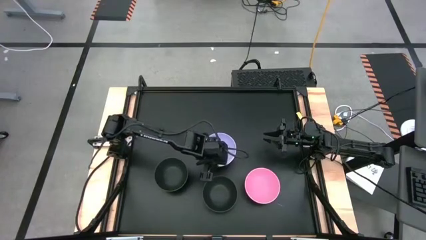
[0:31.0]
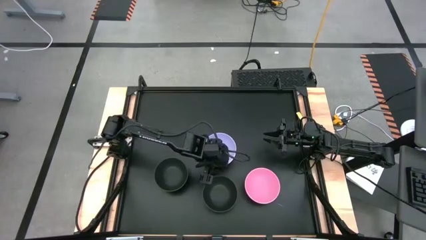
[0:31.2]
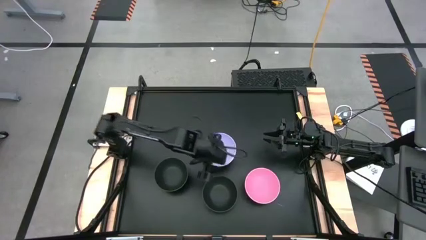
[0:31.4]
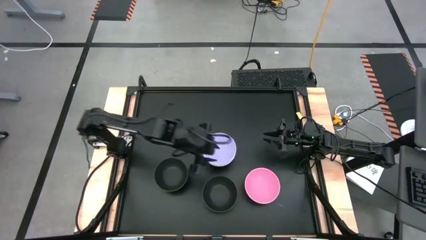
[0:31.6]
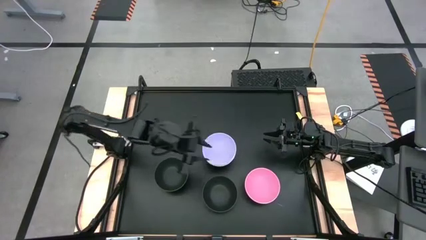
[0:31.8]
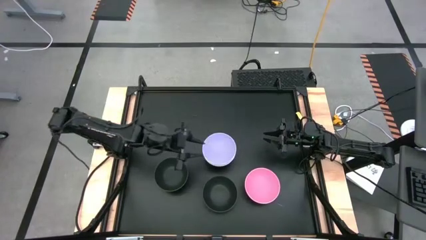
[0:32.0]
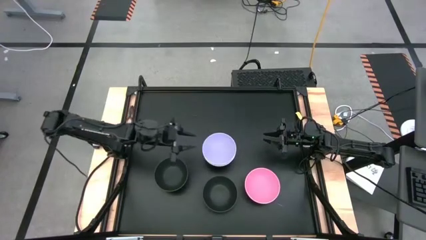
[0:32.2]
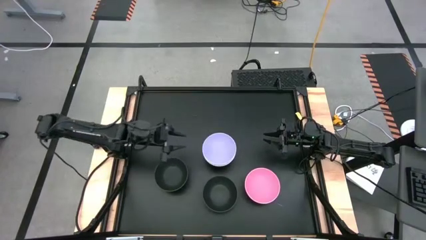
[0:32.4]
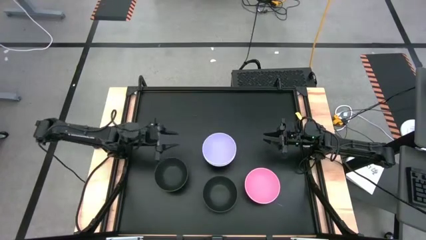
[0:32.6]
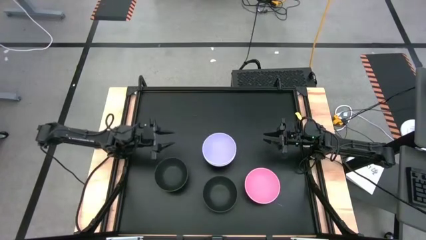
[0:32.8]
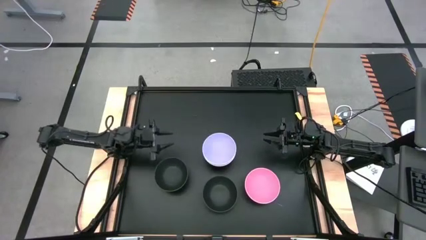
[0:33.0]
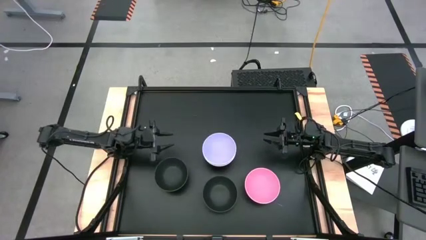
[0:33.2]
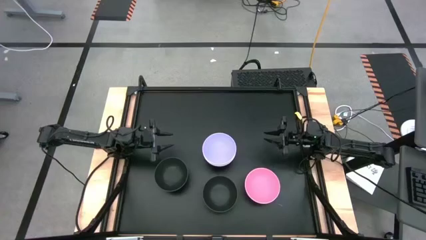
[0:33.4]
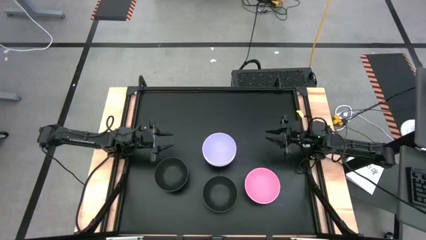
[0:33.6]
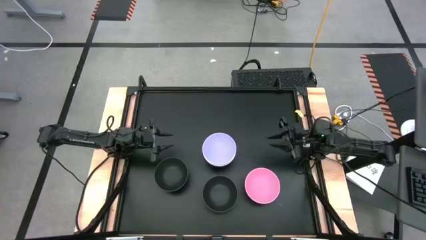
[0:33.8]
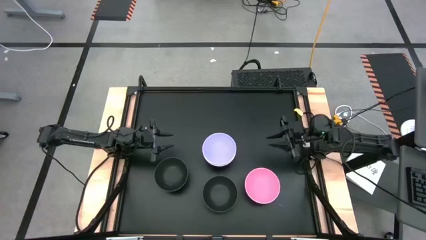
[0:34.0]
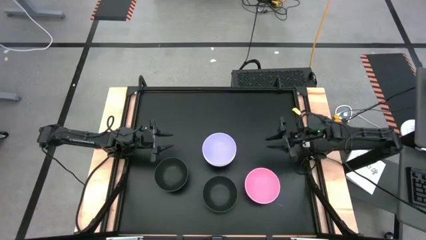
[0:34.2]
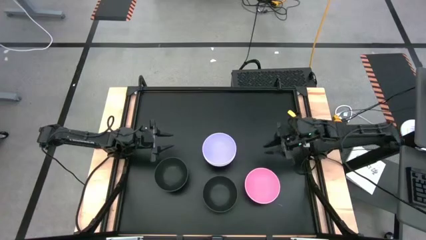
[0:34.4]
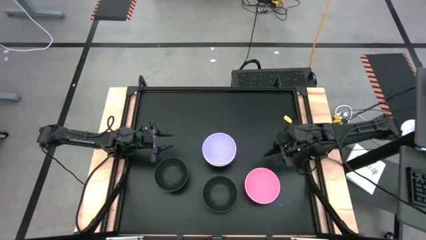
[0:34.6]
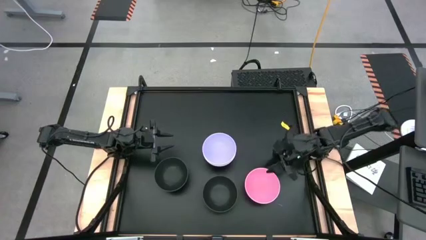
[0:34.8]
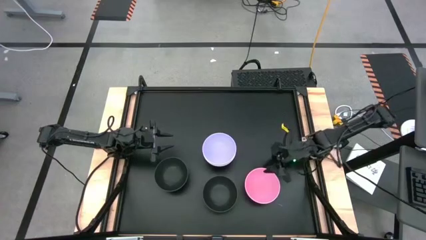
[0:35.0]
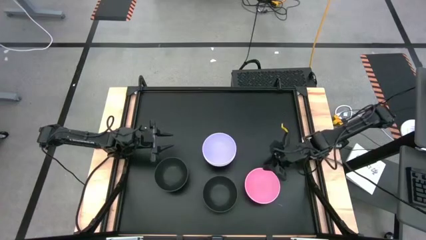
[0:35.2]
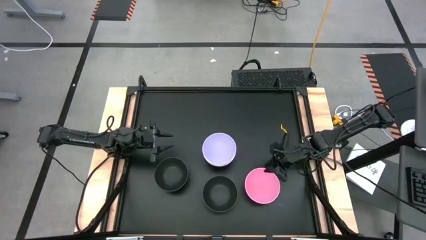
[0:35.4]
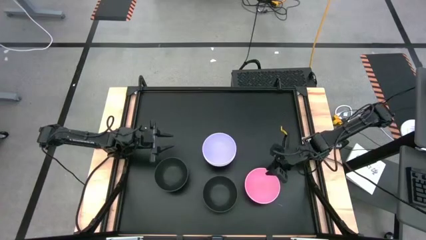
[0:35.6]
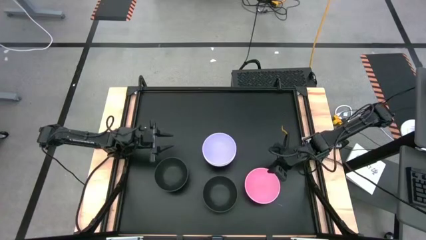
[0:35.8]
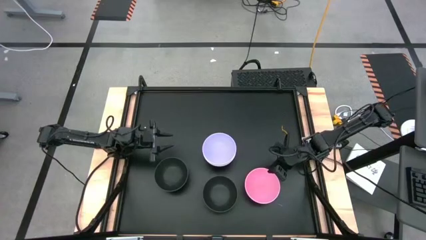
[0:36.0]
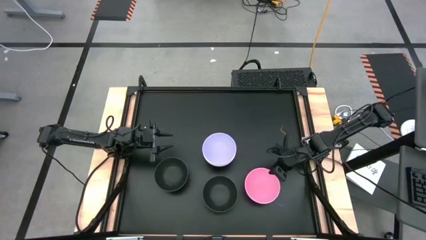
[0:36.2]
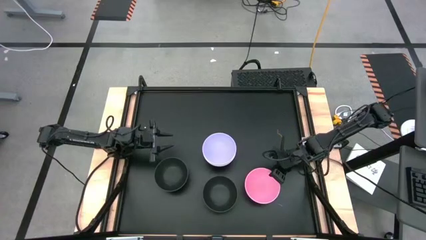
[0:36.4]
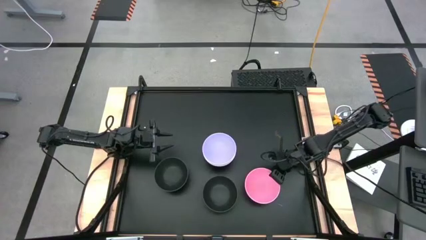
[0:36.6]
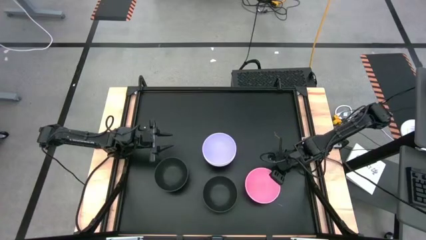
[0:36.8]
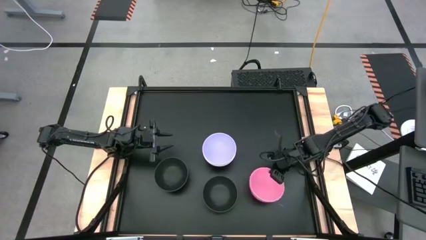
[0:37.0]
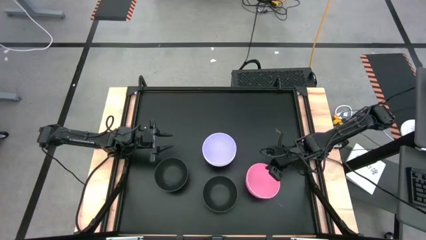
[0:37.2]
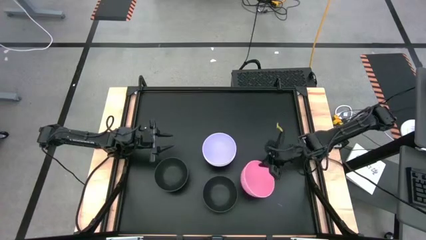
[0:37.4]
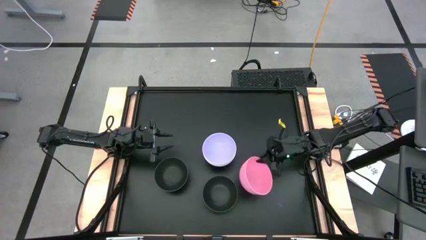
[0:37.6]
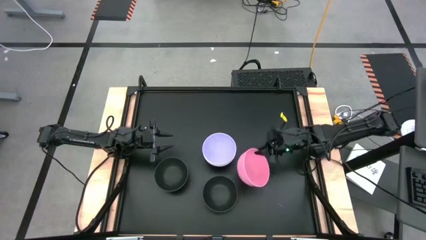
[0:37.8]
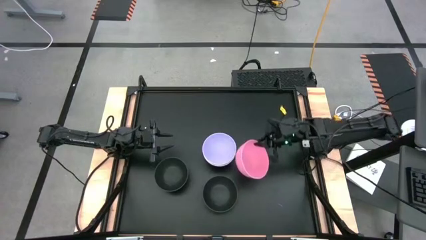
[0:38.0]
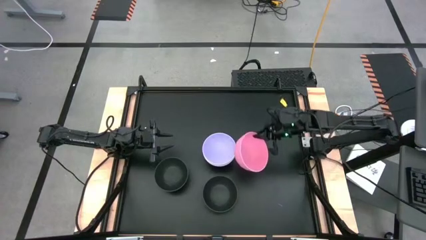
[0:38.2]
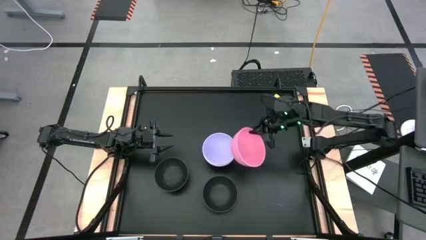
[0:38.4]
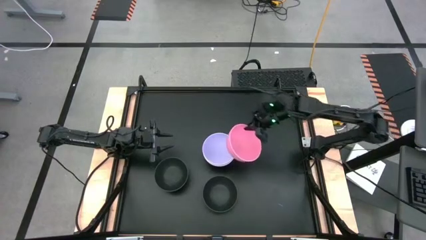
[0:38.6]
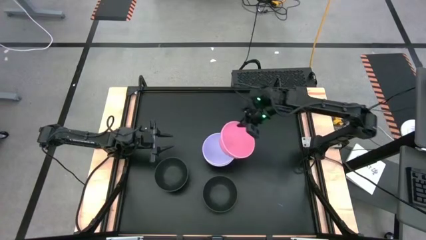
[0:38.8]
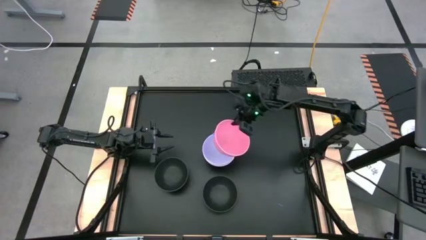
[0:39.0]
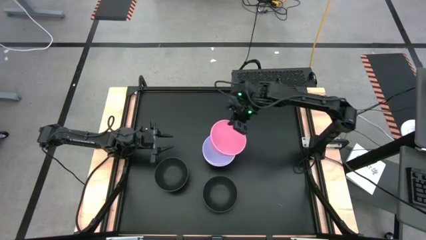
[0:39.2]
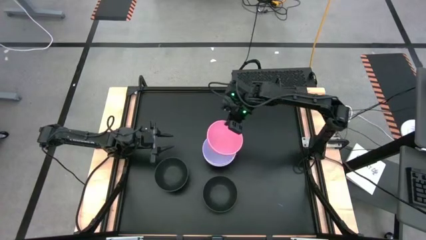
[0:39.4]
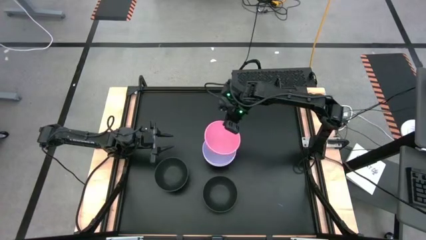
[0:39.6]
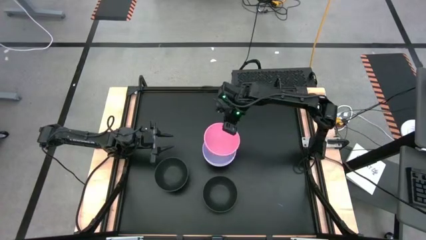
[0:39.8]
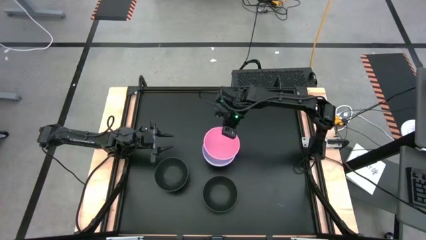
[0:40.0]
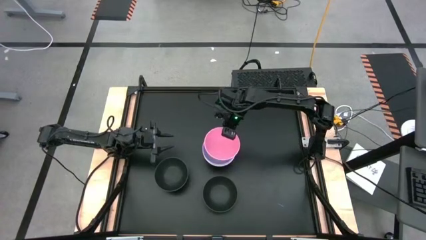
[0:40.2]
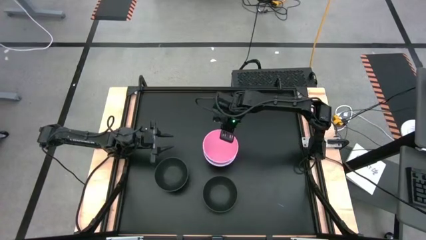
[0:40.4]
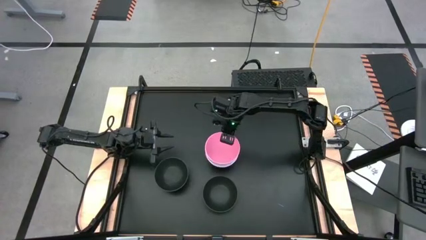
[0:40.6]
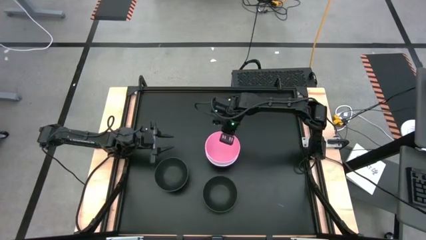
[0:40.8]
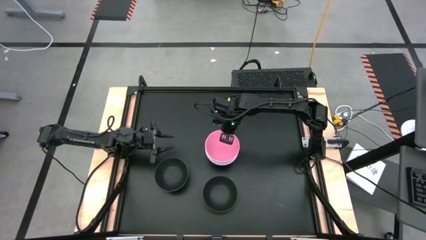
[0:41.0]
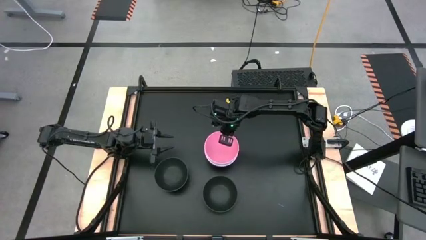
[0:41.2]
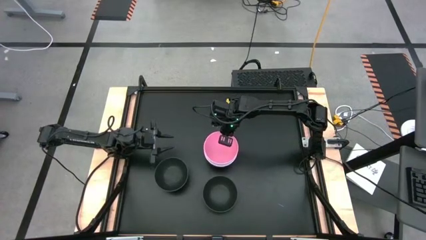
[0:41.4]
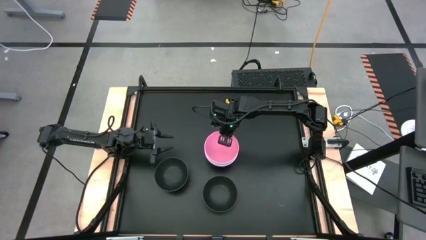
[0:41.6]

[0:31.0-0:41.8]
Task: Nest bowls inside each other
Stack the pink bowl on top of the purple bowl

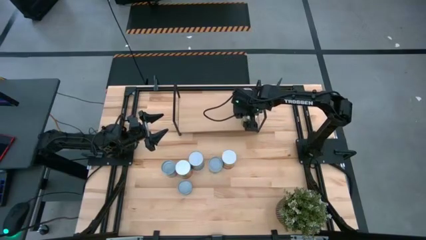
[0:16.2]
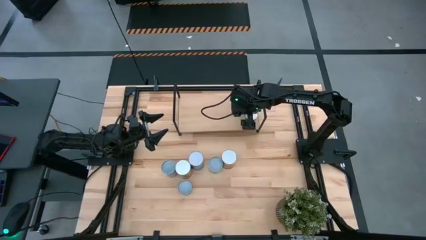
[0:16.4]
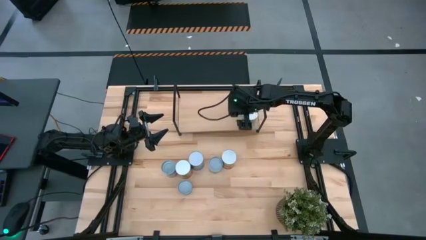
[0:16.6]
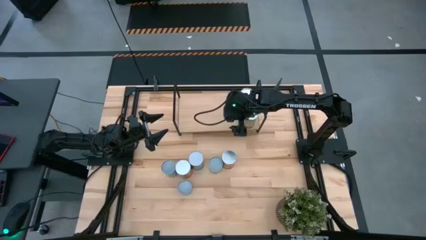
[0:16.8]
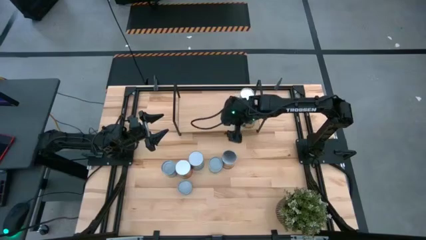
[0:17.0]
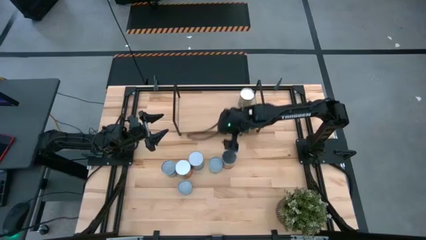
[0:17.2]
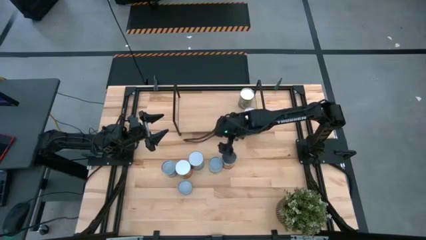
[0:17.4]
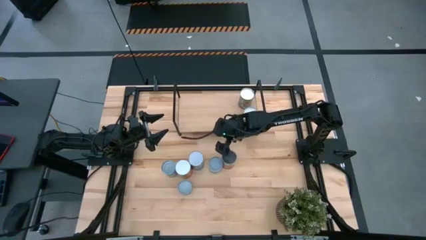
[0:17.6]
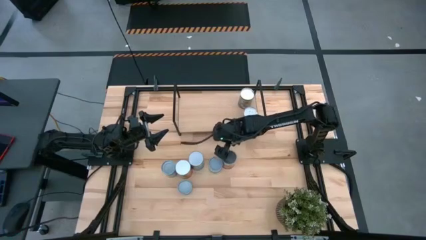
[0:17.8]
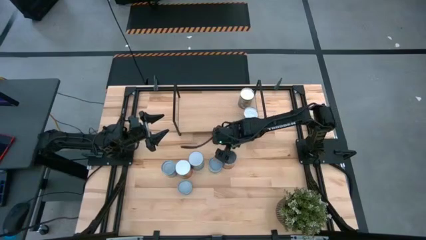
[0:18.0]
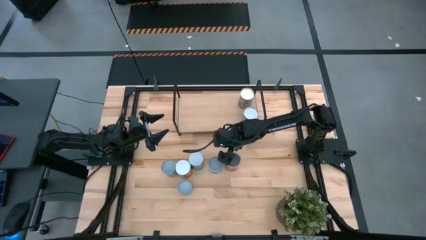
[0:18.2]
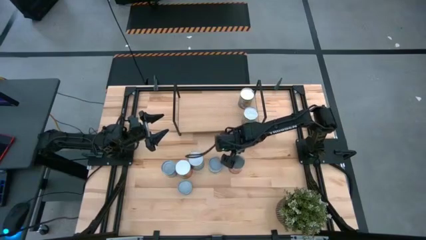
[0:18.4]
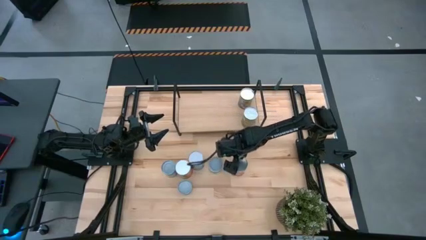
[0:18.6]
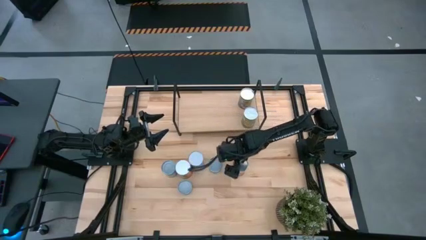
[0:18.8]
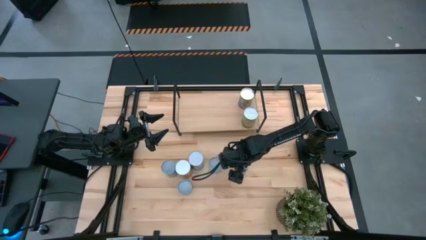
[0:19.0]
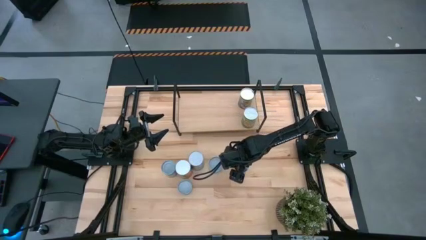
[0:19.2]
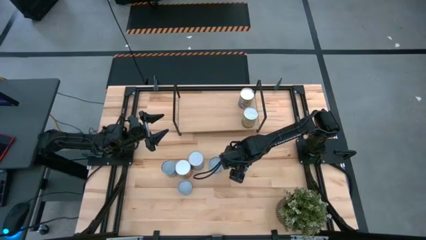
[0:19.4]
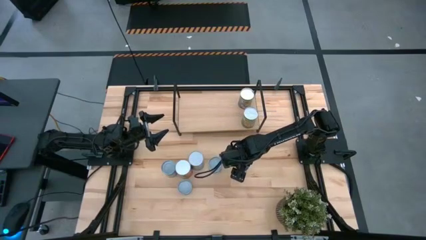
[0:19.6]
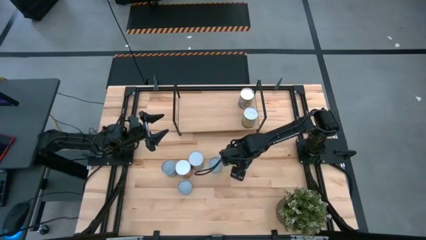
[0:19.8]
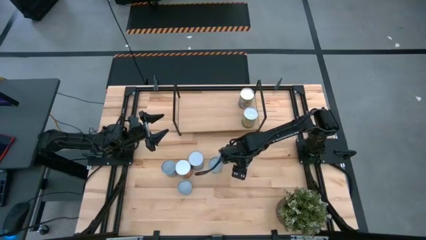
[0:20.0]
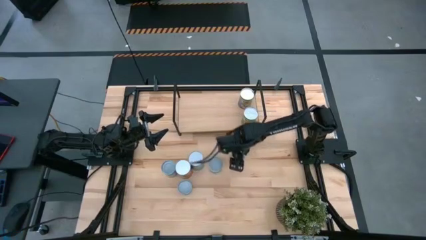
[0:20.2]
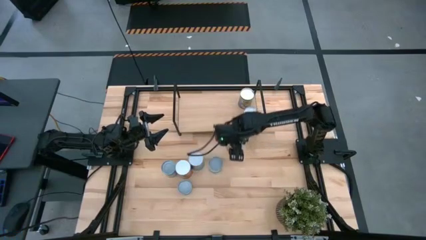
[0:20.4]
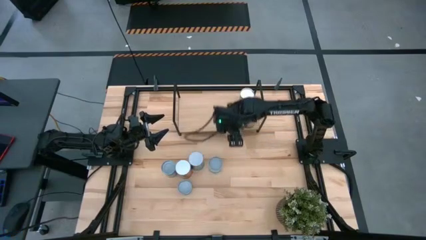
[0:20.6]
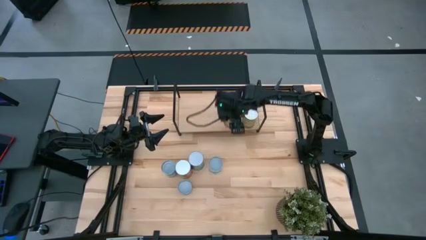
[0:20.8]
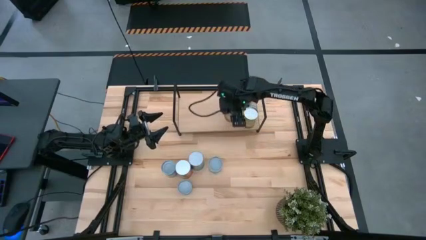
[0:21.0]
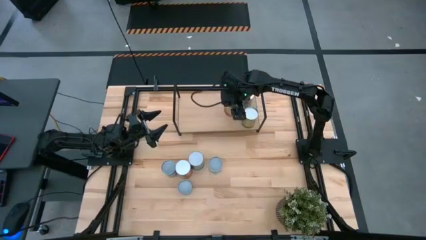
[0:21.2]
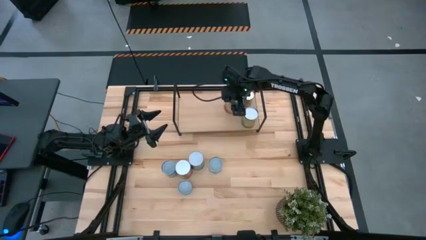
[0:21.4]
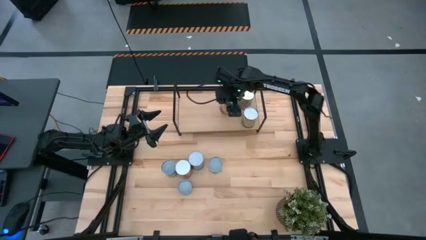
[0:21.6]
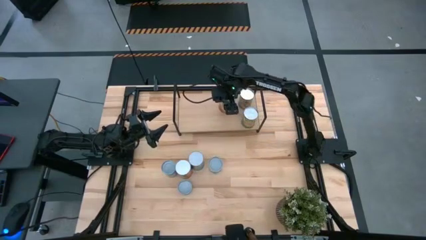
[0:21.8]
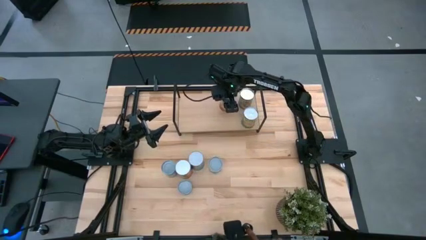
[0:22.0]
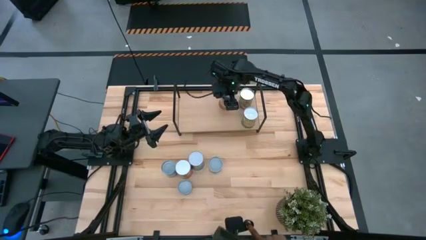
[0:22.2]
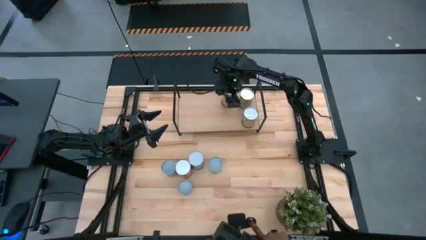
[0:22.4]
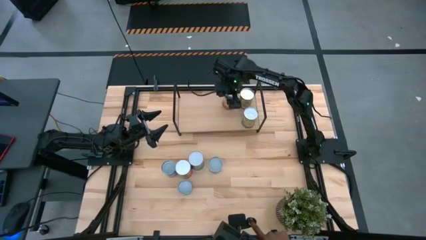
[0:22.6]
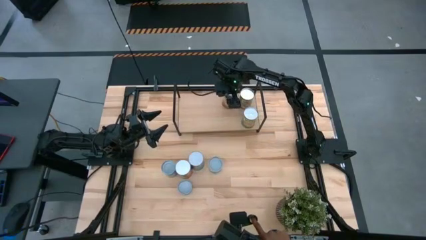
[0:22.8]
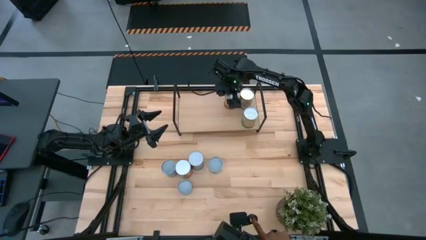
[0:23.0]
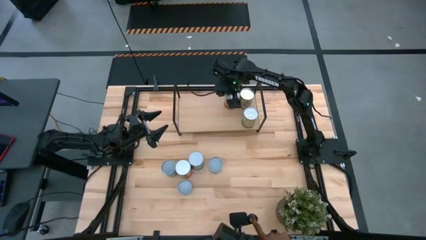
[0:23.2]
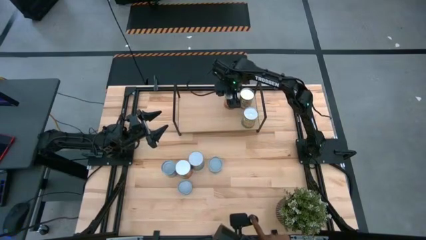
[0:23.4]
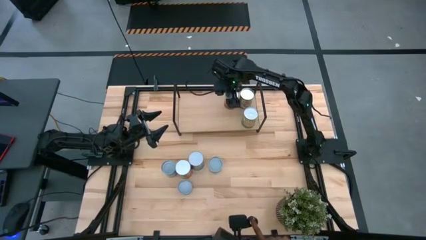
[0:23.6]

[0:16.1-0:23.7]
Task: Pick and place cans onto a shelf
Put the canned corn on the shelf
